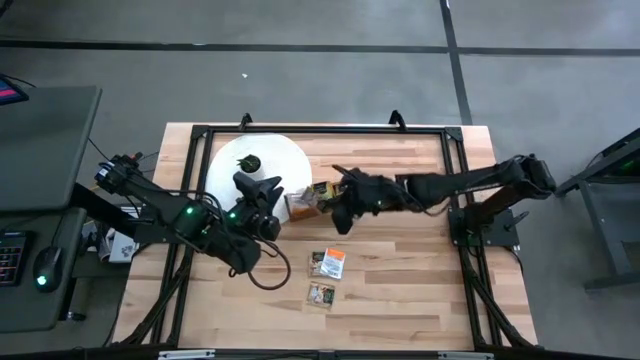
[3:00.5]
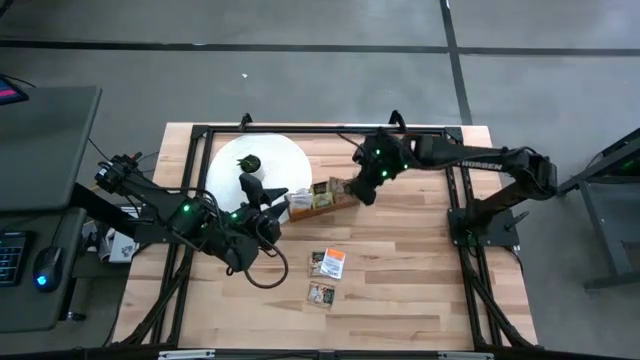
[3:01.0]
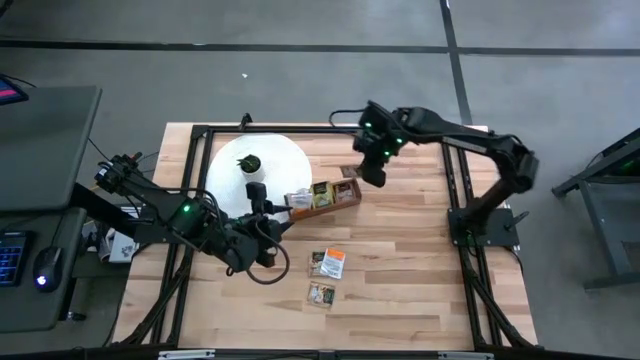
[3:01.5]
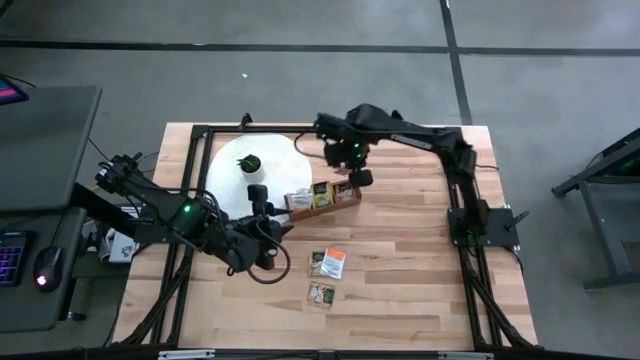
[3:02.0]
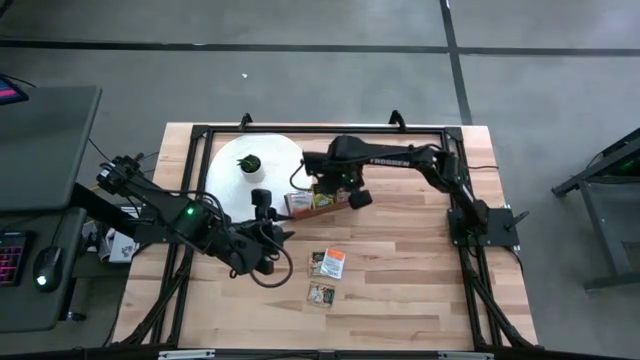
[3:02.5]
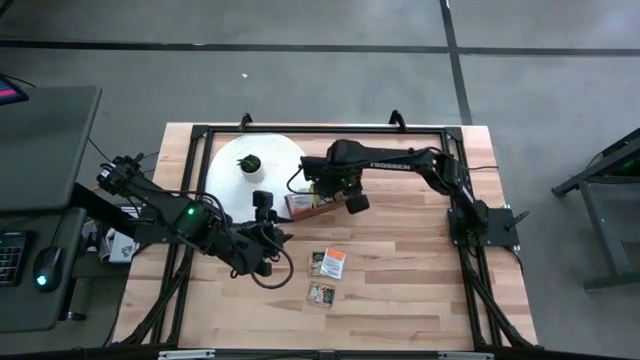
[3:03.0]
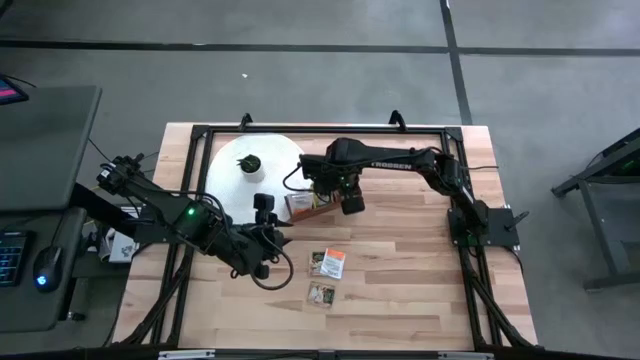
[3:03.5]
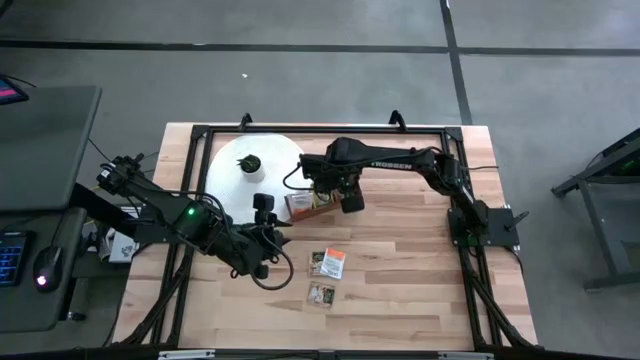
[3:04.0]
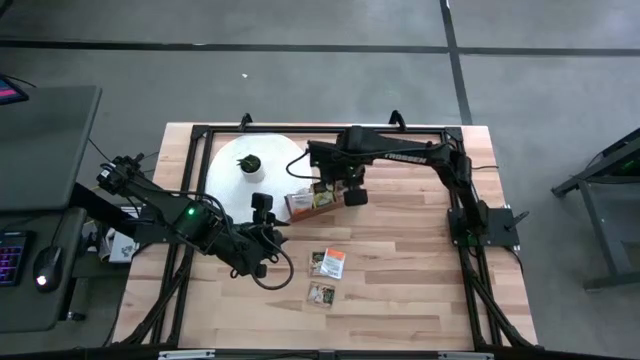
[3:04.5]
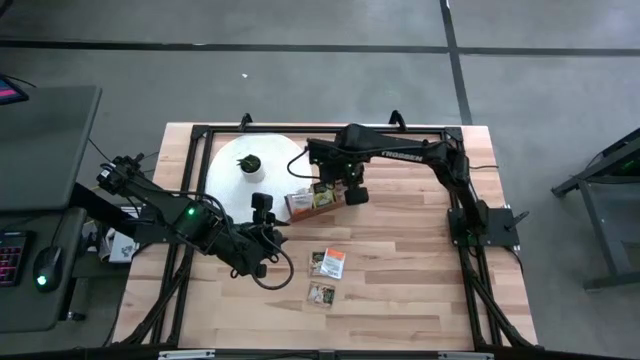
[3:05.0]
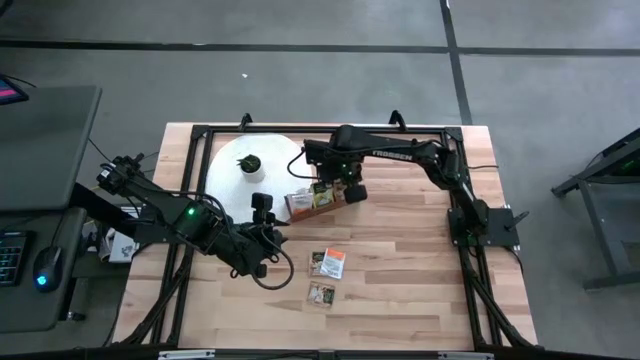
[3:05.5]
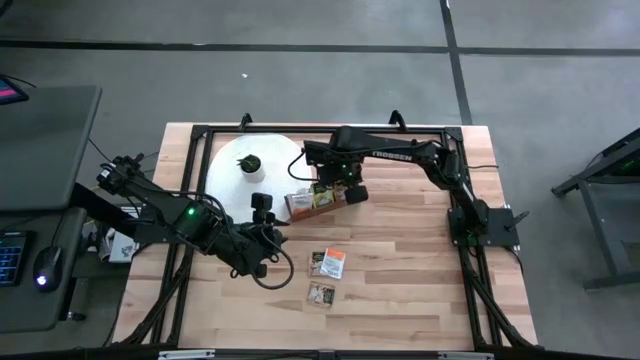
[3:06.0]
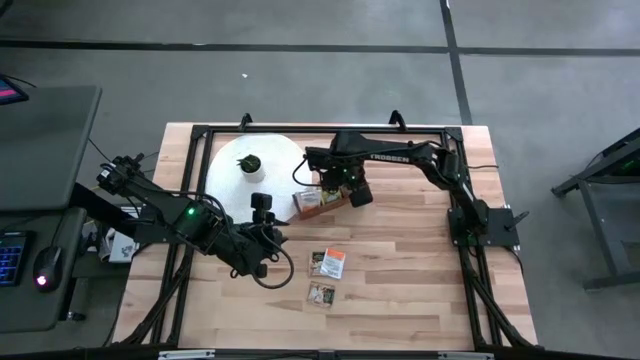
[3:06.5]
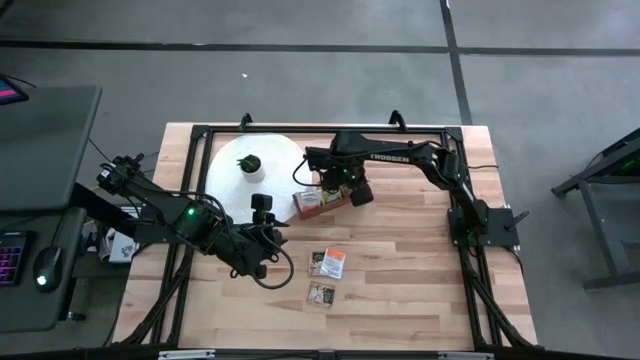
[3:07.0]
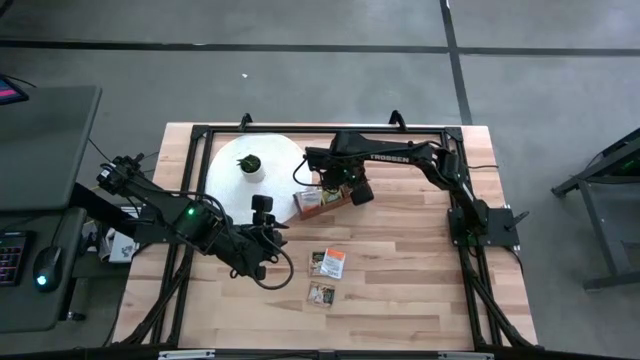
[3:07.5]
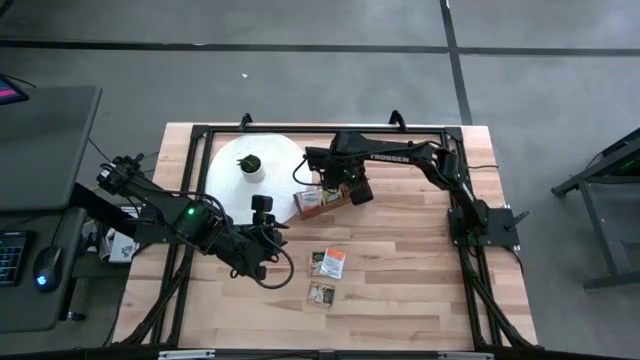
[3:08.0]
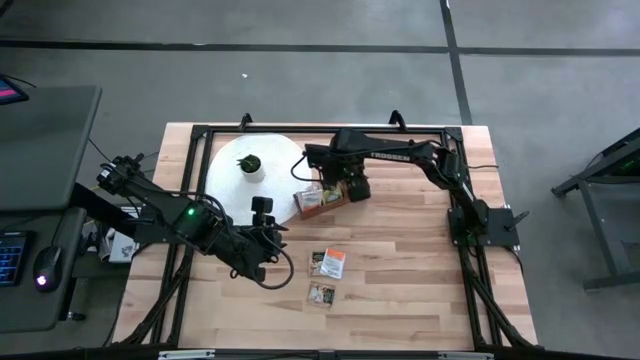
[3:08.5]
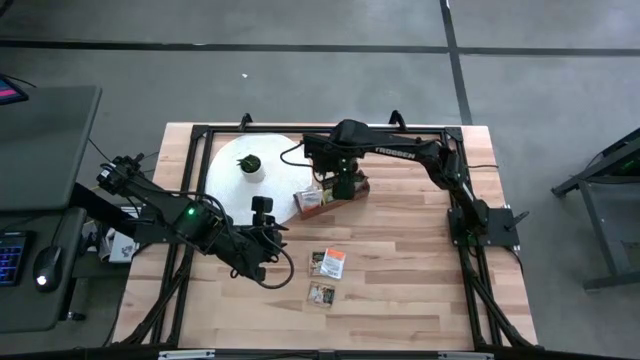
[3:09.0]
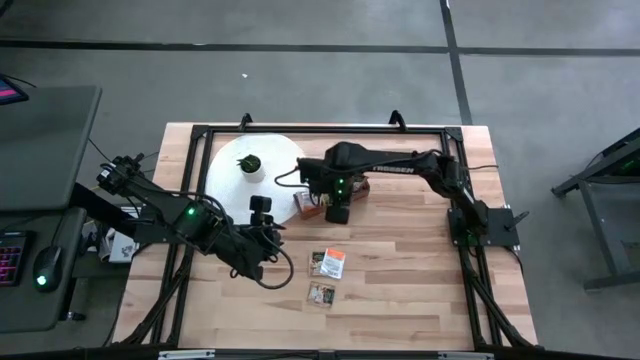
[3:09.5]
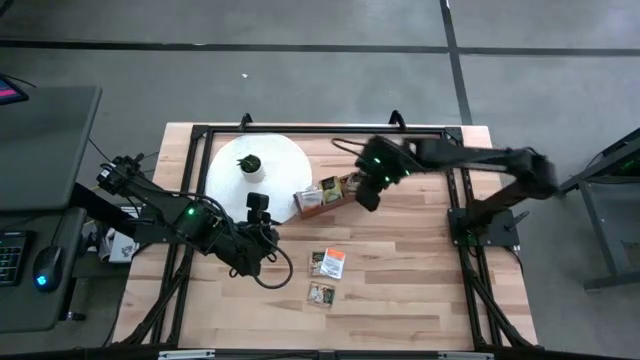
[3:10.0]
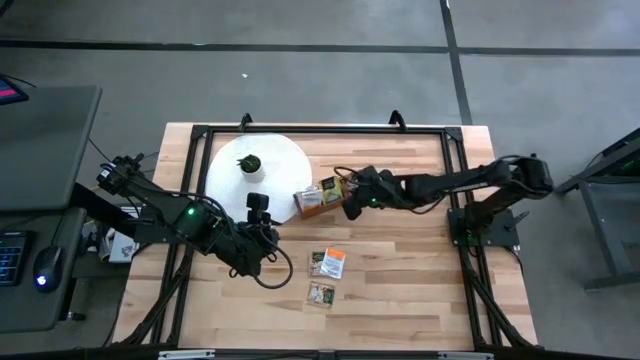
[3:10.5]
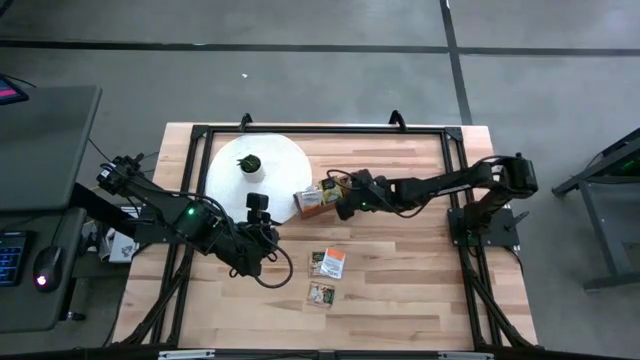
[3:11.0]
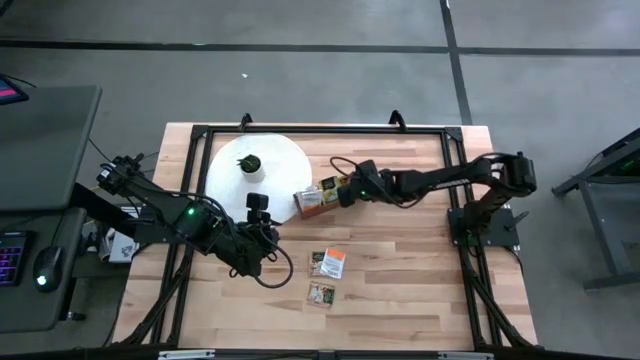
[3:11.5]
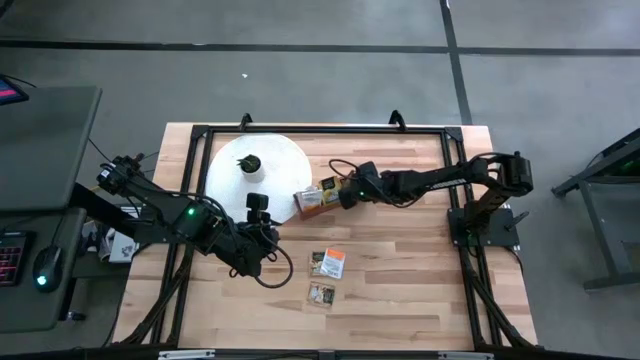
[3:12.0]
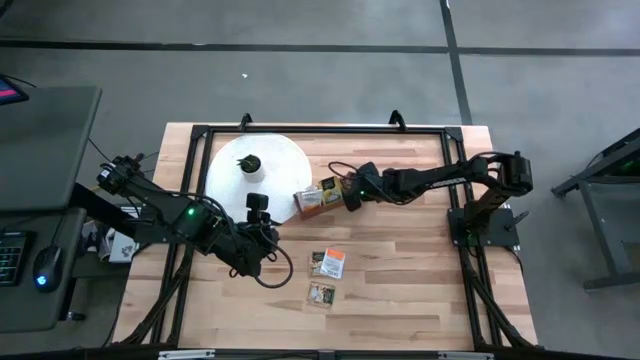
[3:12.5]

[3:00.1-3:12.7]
Task: Pick & Place Tea
Put the brown tea bag into the right section of the wooden organizer

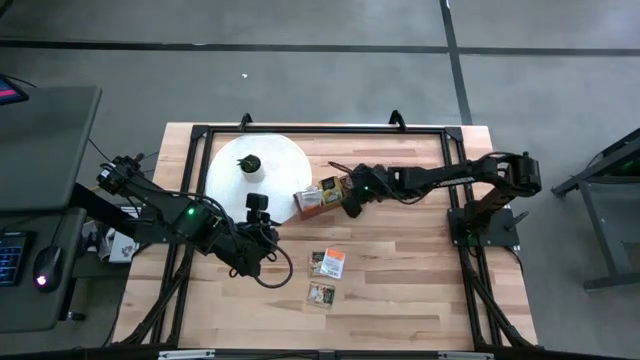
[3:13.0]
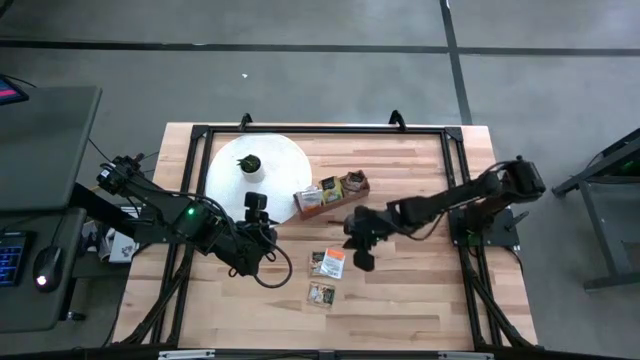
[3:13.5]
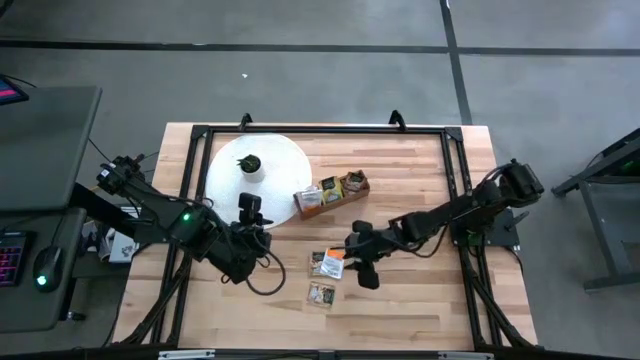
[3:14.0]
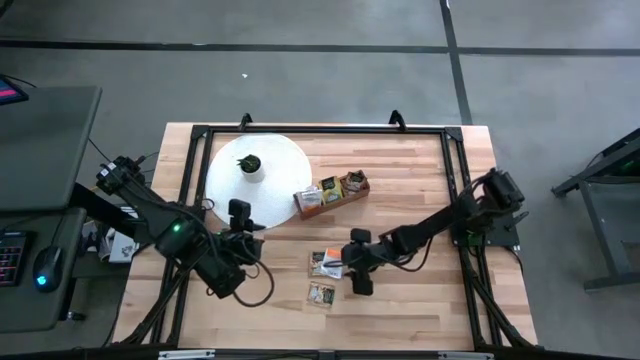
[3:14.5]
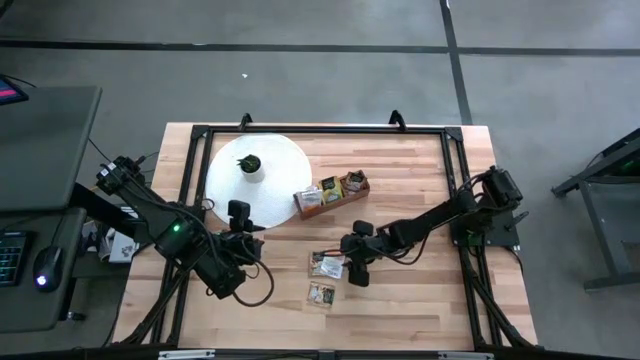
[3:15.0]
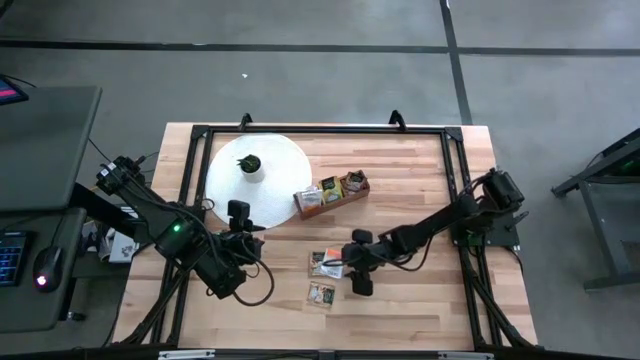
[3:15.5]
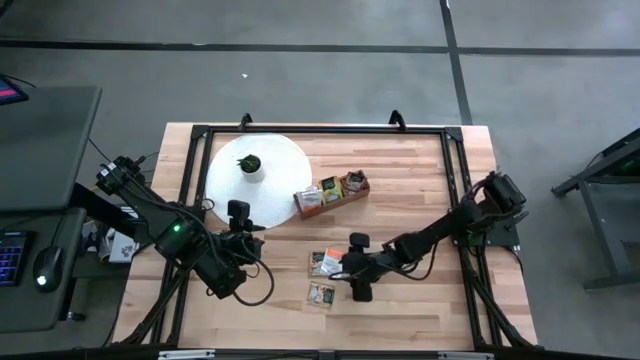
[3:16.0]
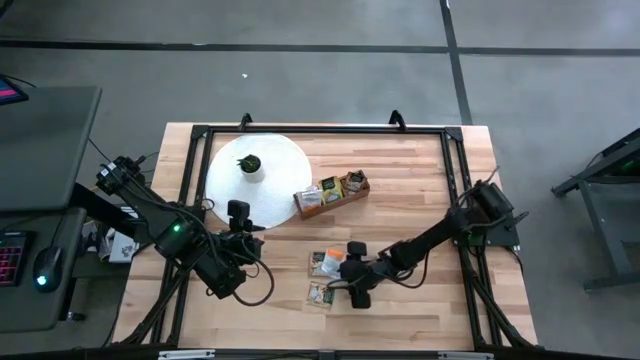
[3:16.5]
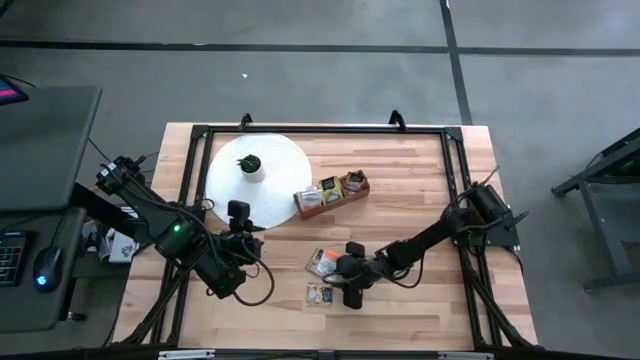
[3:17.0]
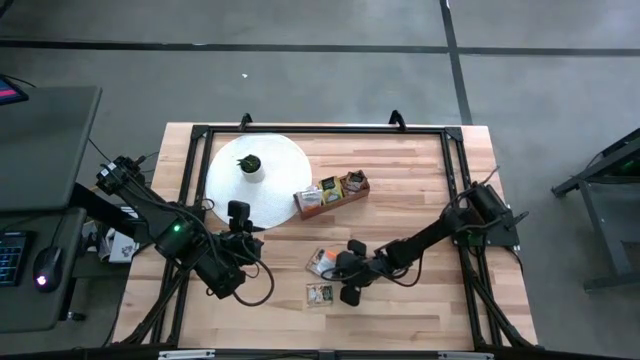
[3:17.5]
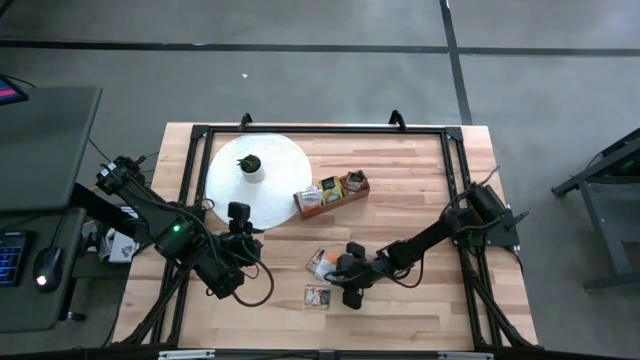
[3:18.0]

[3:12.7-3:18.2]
Put the white tea bag into the left section of the wooden organizer

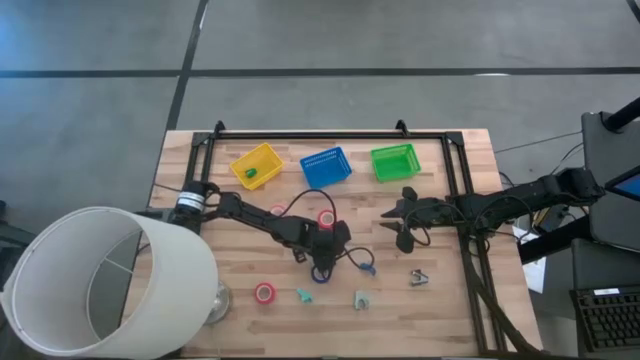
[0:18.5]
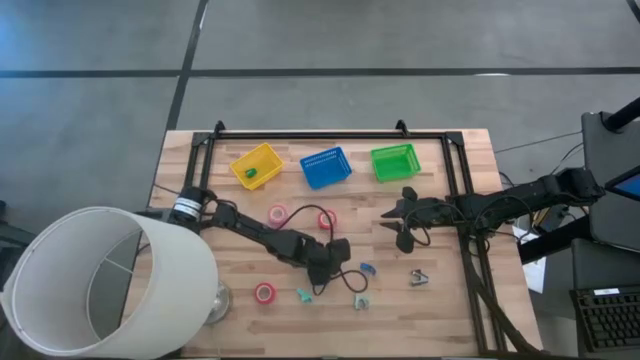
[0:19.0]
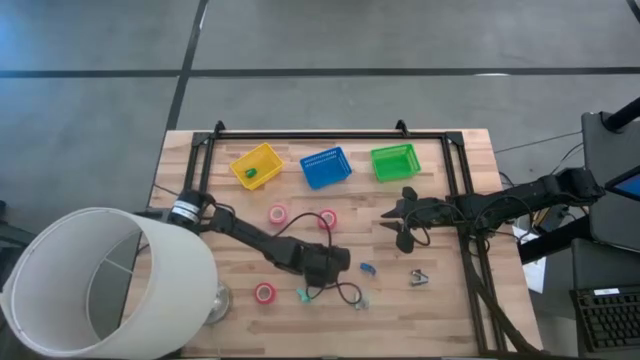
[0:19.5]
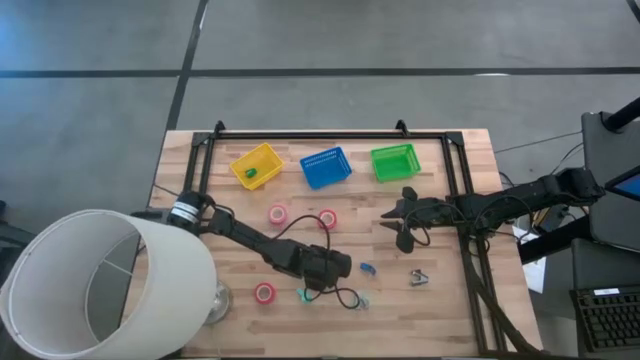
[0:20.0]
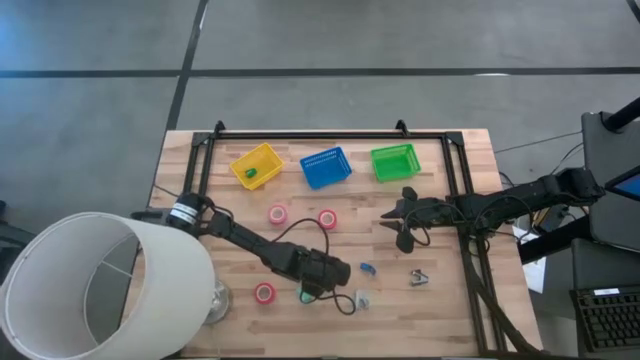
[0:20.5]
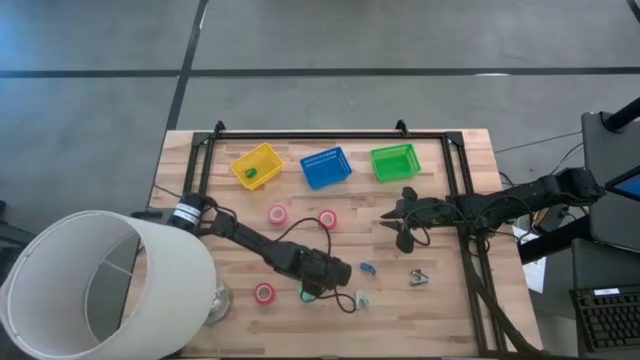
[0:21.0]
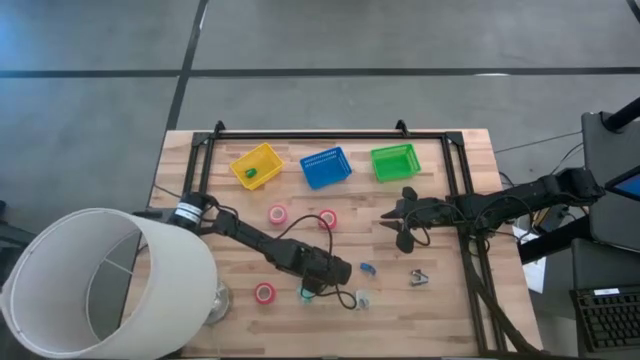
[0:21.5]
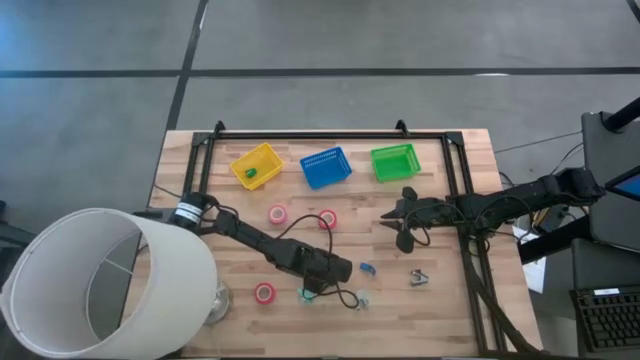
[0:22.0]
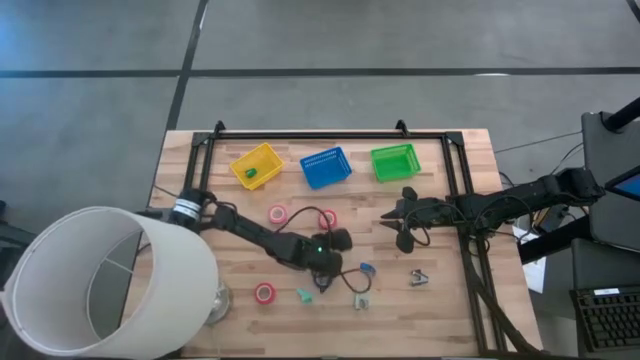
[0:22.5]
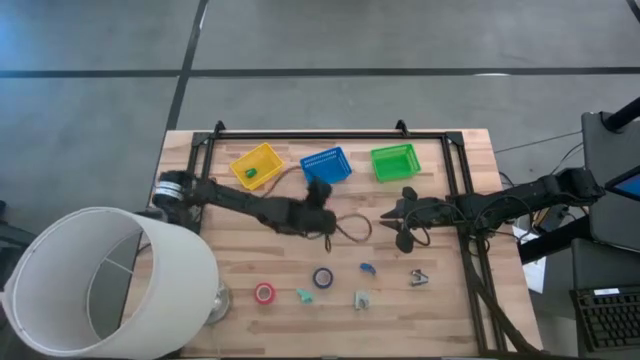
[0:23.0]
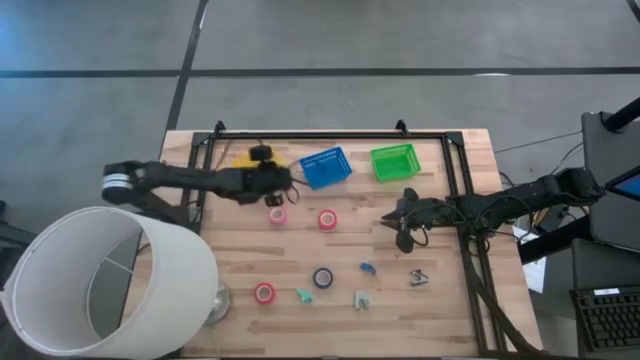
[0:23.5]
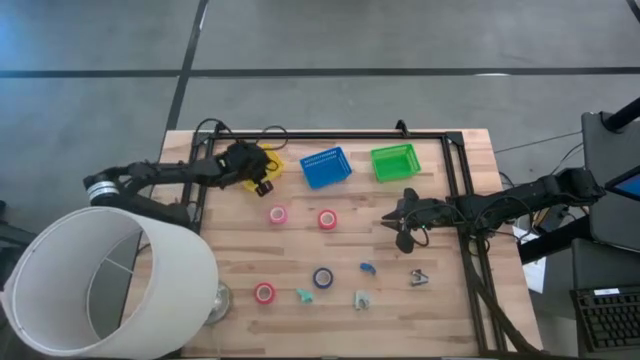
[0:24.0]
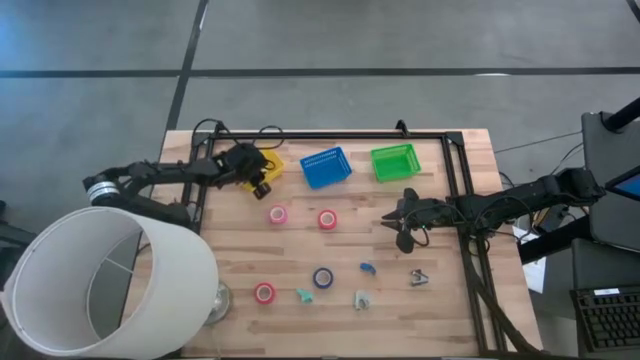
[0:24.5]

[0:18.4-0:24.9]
Task: Pick and place Stapler, Stapler remover, tape
Put the yellow stapler into the yellow basket
